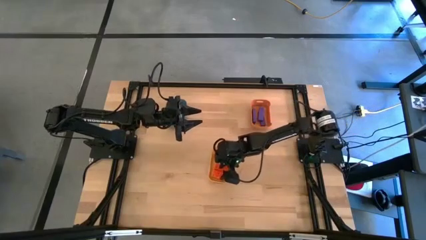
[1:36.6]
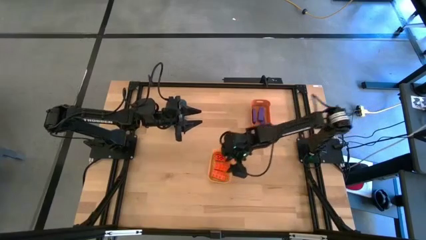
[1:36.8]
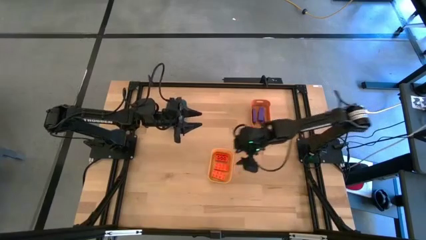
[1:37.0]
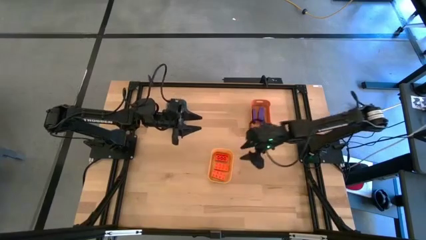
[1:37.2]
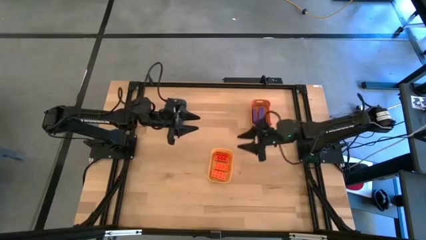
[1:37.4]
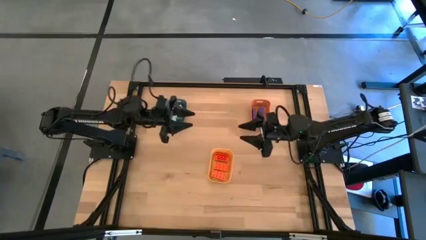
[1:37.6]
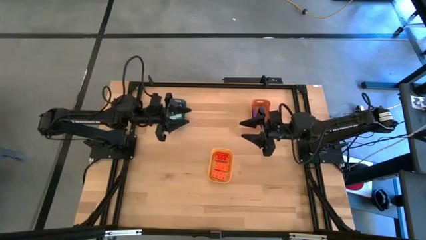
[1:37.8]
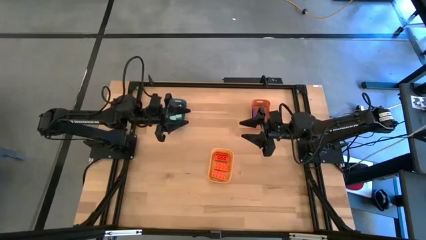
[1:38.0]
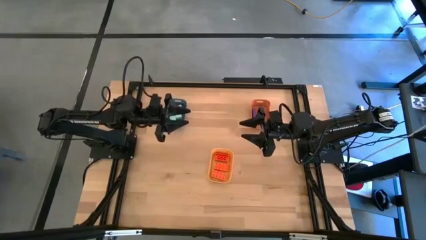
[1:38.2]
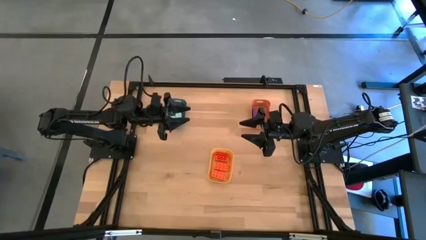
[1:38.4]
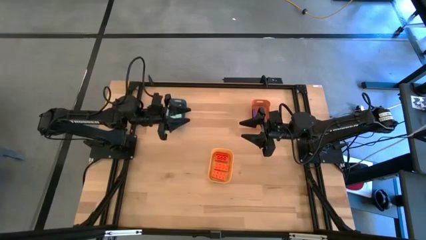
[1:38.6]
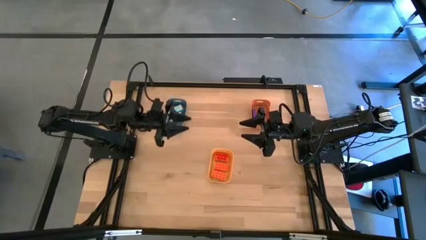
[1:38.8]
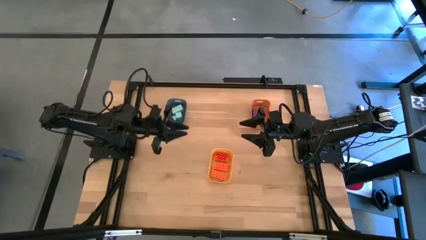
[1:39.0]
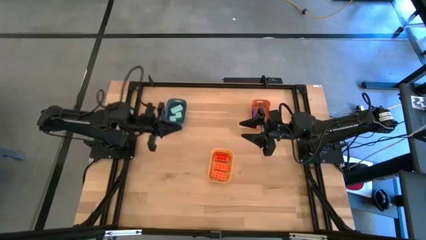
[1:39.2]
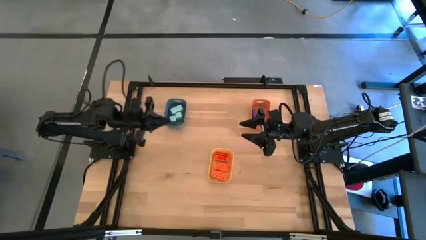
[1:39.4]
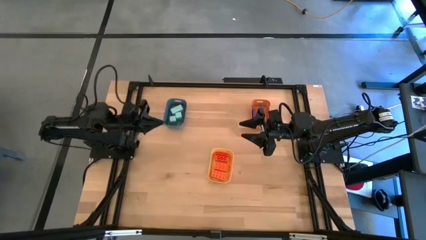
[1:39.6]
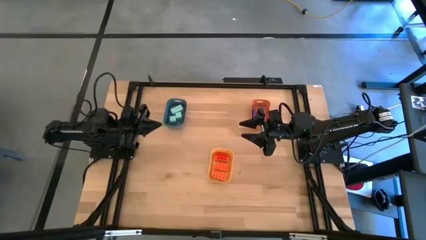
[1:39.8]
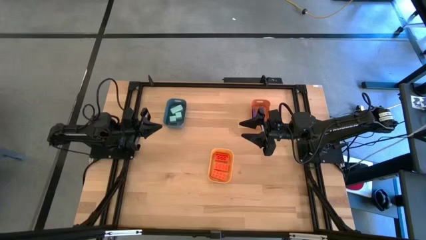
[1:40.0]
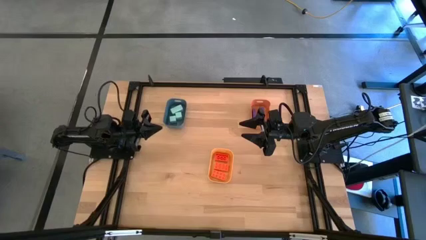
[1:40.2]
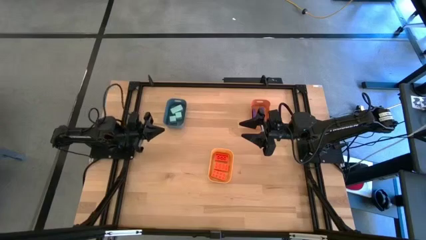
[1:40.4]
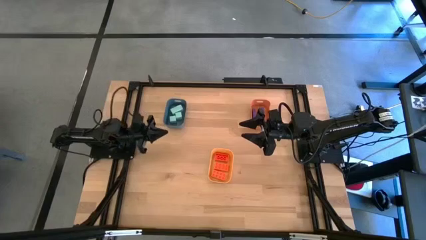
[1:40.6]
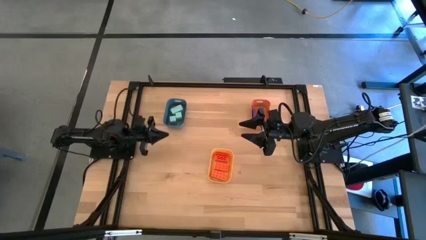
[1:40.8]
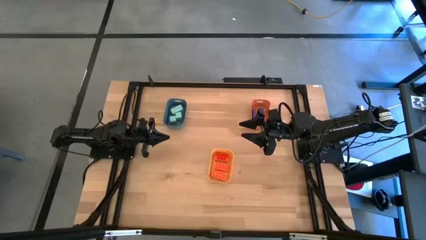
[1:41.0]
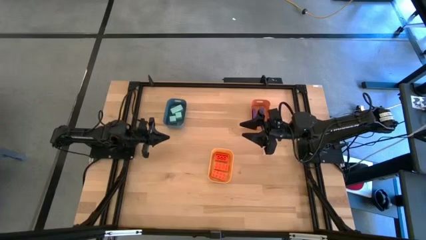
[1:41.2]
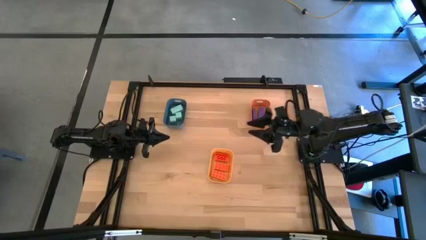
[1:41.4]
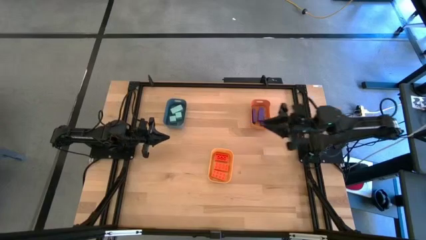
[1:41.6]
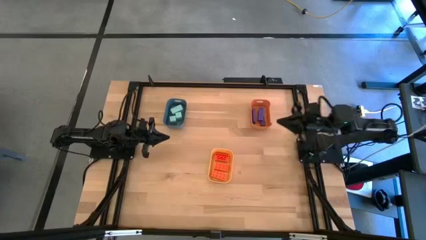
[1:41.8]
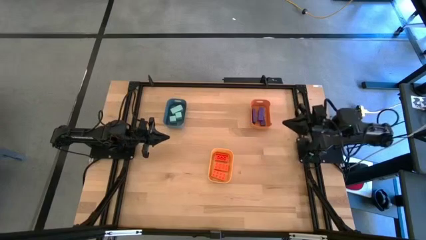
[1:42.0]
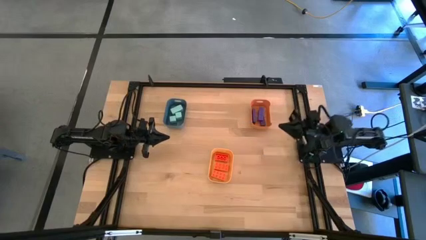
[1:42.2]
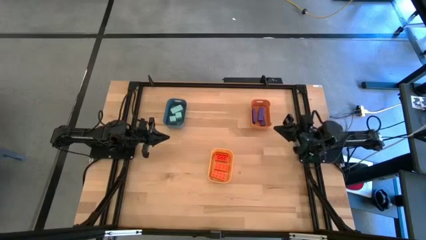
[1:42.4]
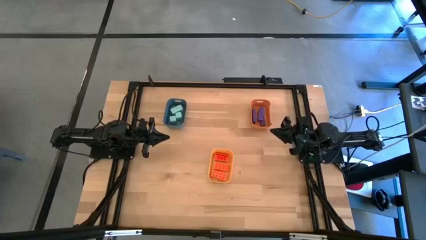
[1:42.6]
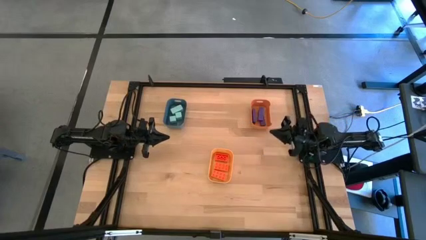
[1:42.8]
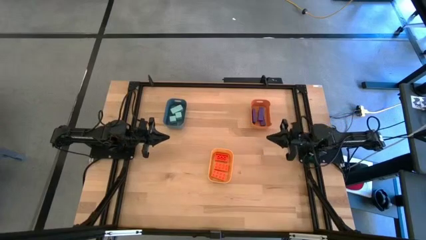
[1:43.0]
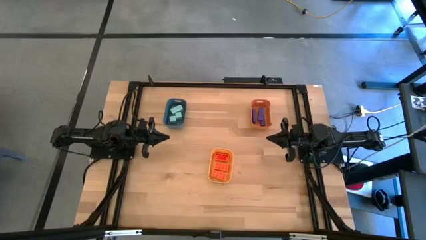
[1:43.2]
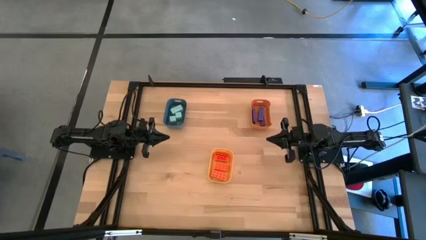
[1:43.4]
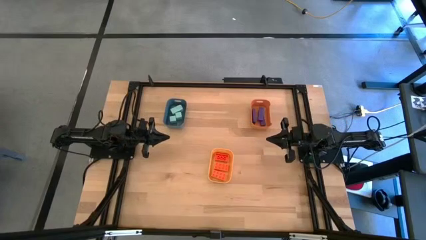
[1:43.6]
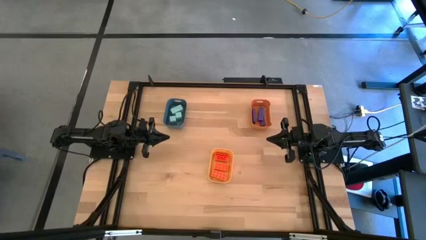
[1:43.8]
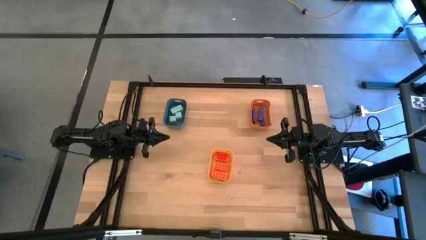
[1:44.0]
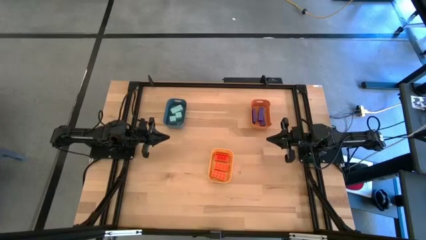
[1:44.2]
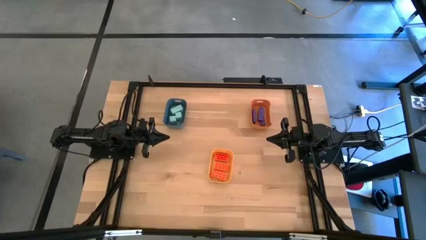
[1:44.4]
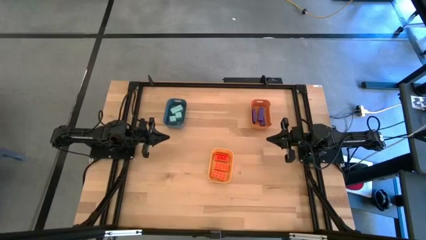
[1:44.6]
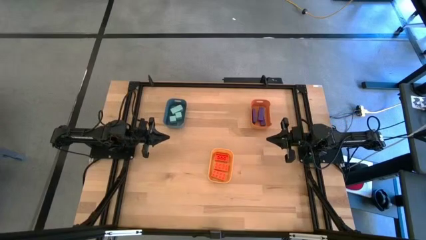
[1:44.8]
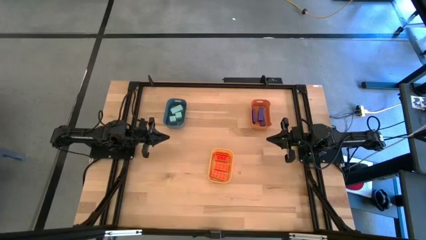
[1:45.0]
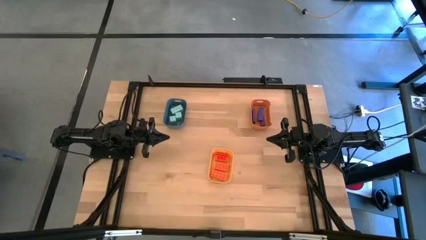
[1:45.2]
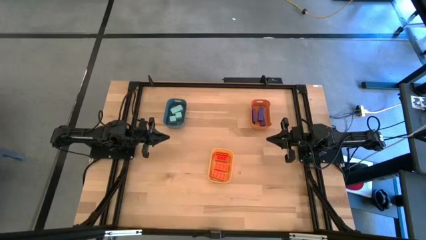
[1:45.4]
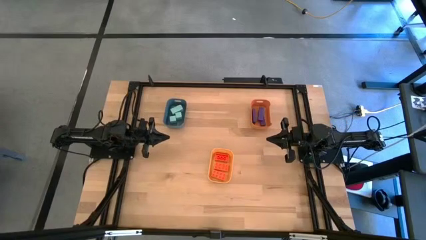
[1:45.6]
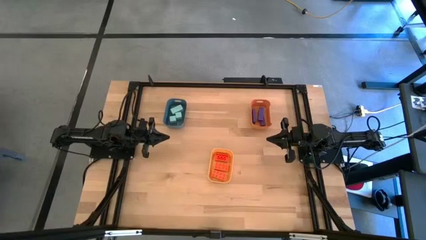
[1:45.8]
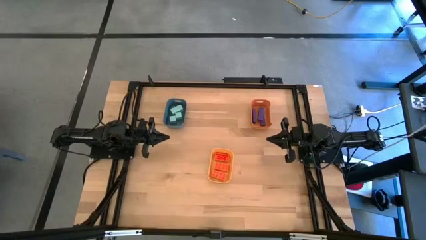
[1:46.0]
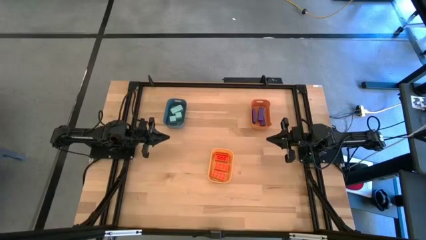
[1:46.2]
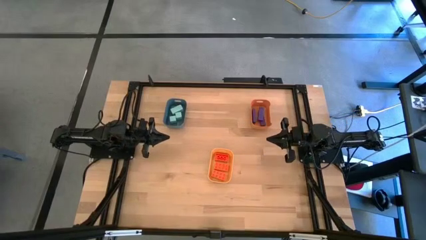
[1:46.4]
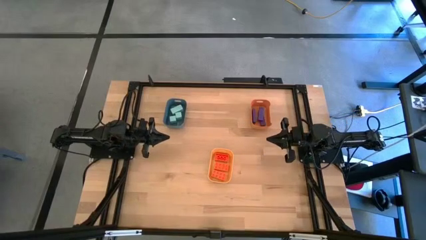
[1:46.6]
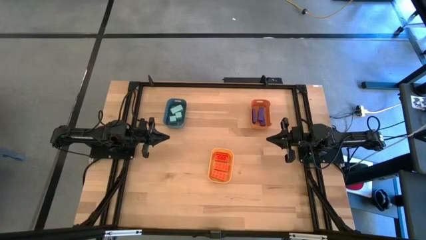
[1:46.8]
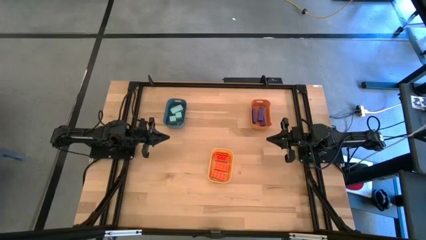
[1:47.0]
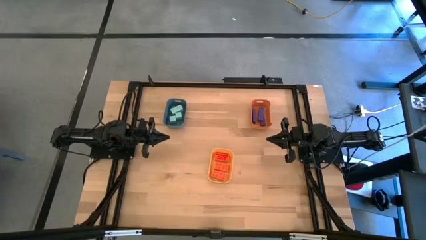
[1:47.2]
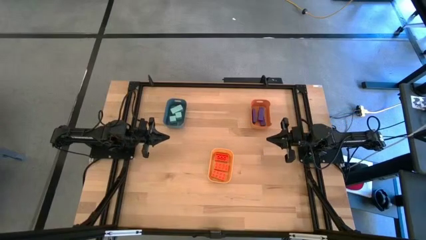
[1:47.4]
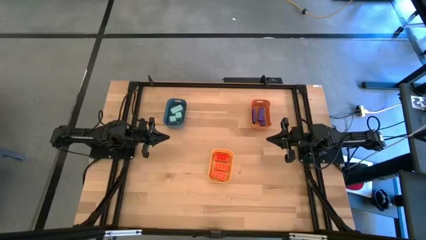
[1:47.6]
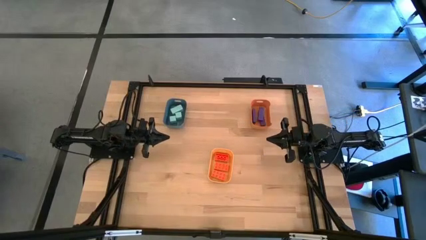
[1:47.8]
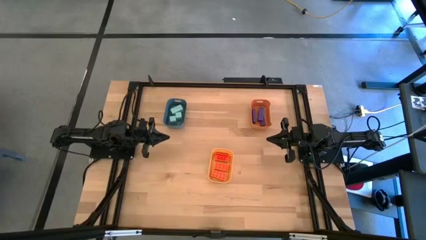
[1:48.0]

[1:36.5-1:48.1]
Task: Sort & place blocks by color
Return to Home Position
